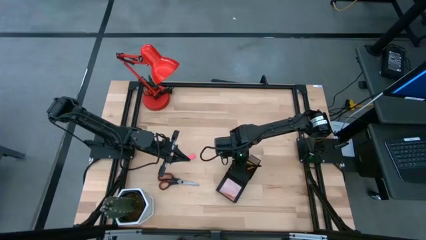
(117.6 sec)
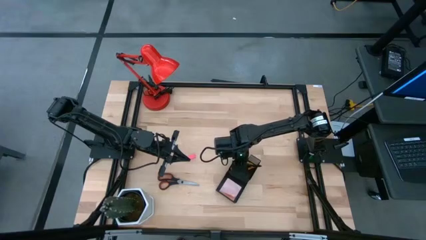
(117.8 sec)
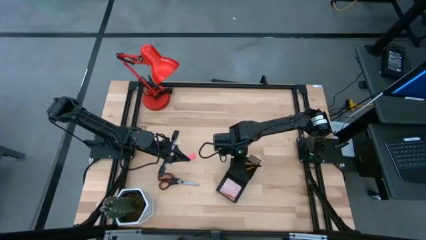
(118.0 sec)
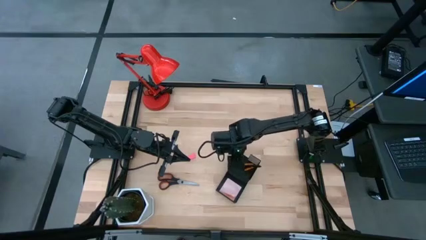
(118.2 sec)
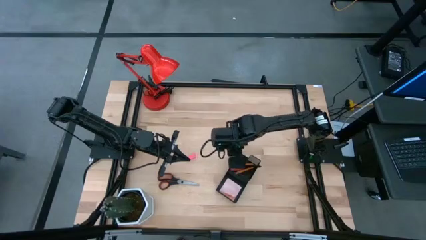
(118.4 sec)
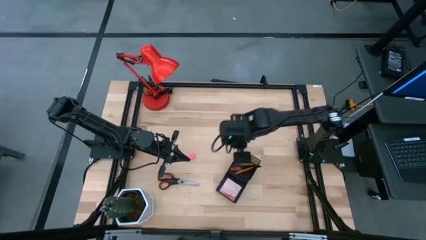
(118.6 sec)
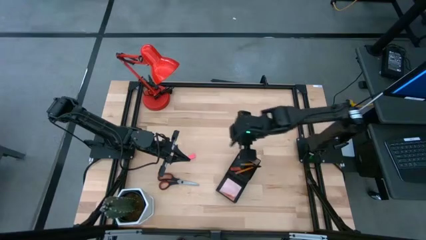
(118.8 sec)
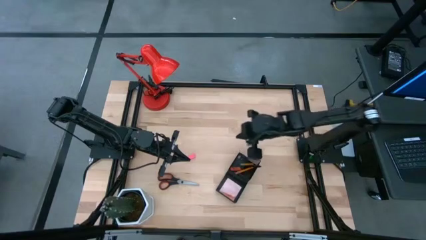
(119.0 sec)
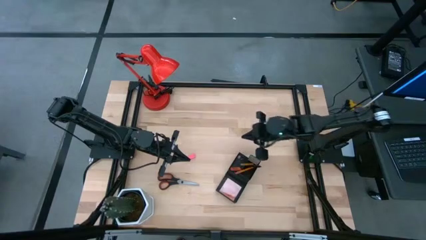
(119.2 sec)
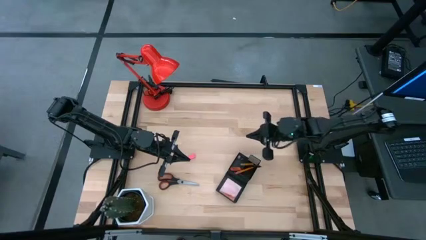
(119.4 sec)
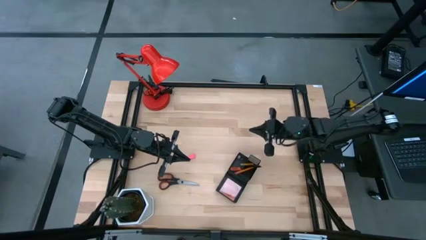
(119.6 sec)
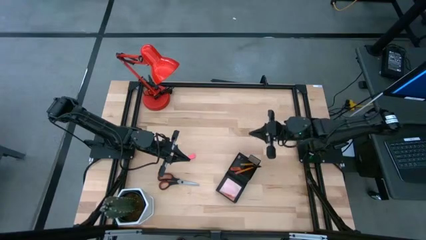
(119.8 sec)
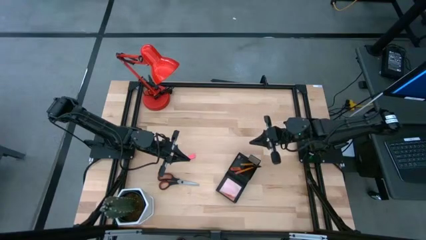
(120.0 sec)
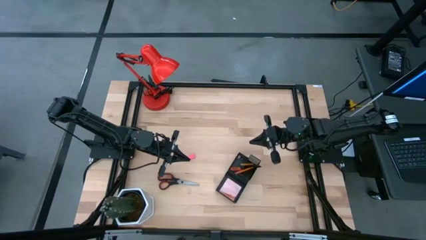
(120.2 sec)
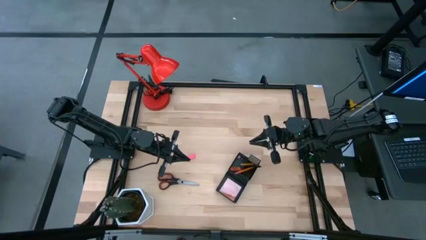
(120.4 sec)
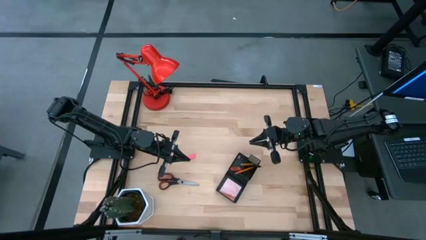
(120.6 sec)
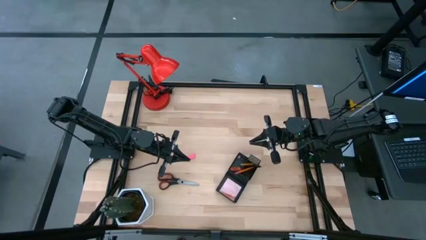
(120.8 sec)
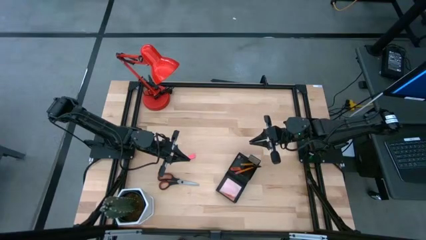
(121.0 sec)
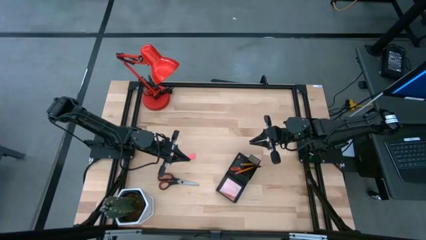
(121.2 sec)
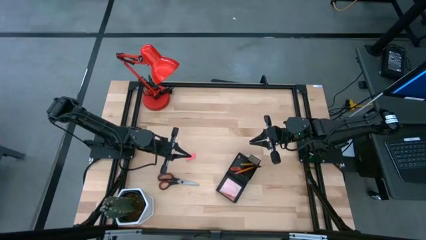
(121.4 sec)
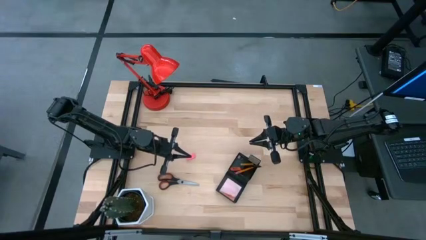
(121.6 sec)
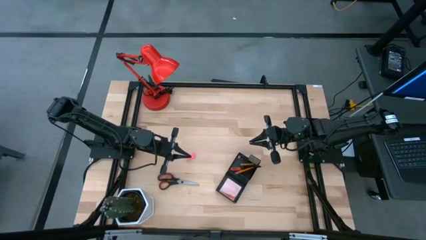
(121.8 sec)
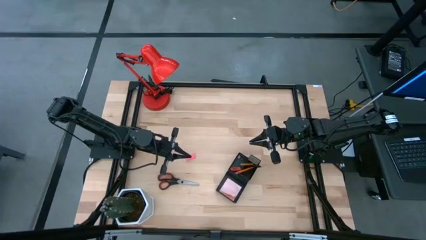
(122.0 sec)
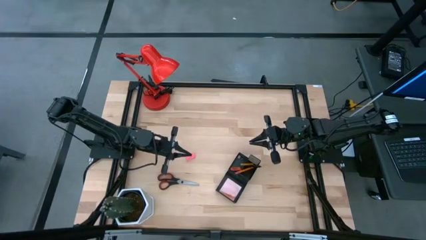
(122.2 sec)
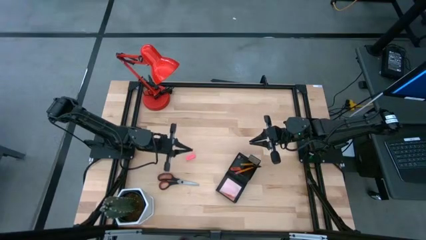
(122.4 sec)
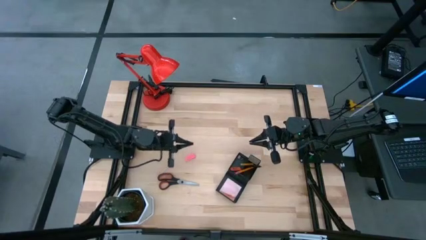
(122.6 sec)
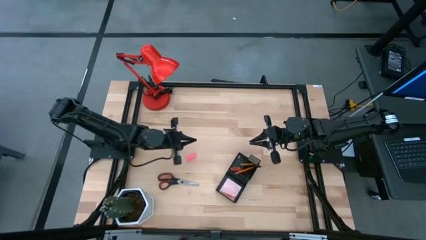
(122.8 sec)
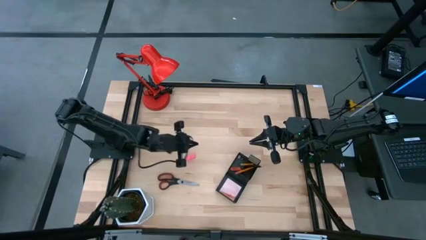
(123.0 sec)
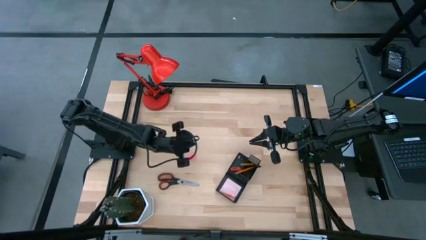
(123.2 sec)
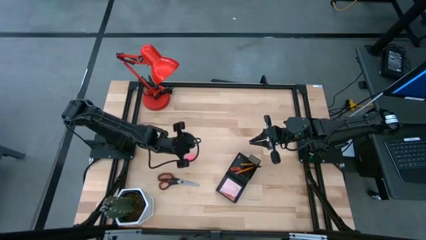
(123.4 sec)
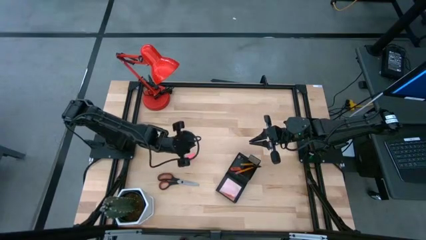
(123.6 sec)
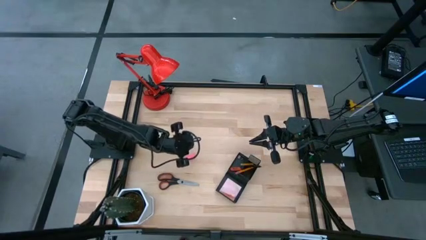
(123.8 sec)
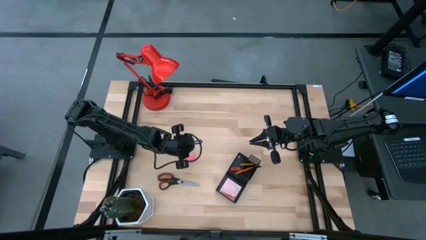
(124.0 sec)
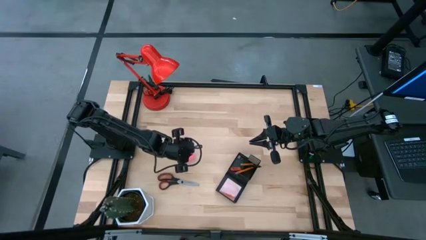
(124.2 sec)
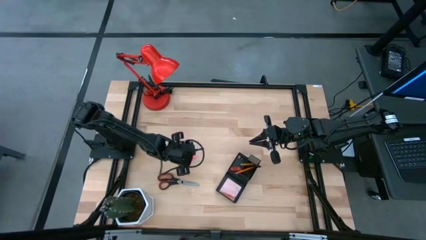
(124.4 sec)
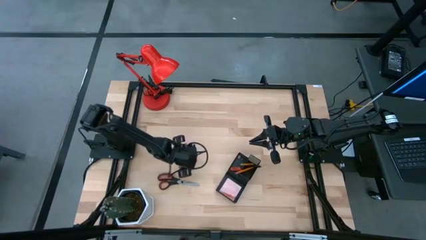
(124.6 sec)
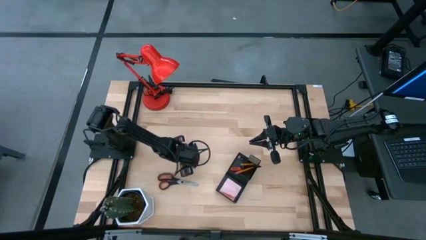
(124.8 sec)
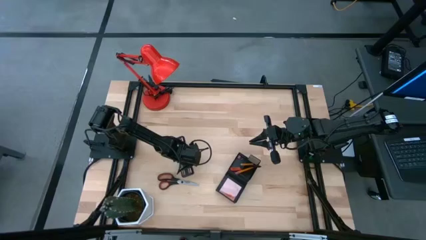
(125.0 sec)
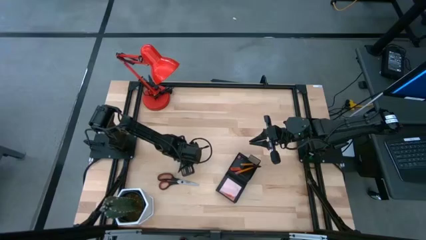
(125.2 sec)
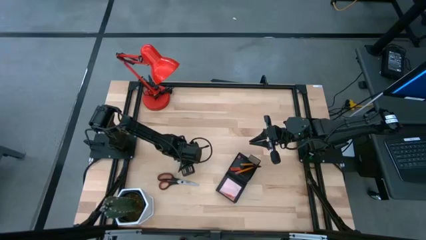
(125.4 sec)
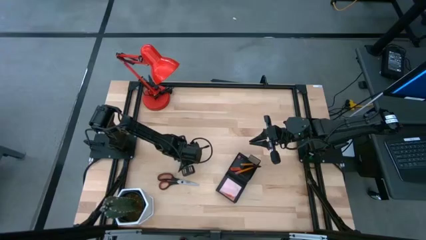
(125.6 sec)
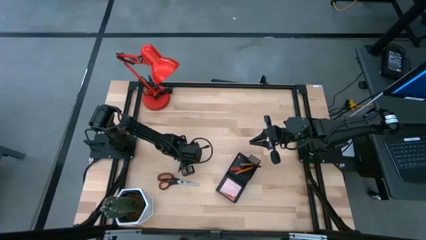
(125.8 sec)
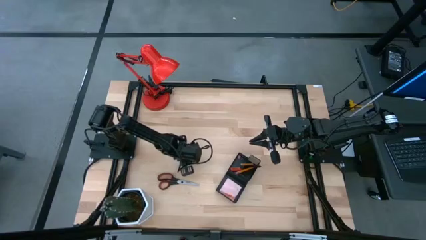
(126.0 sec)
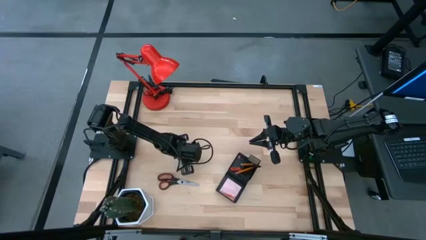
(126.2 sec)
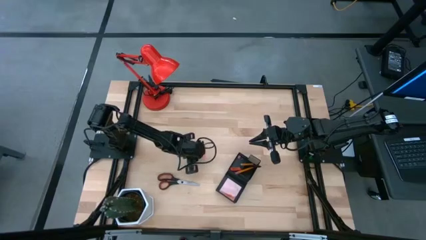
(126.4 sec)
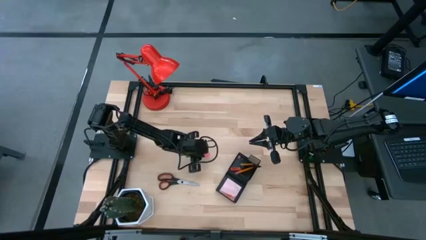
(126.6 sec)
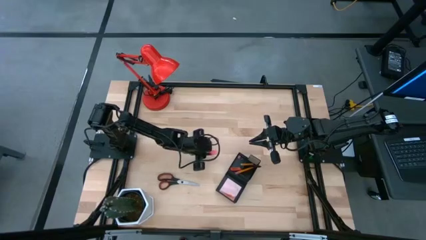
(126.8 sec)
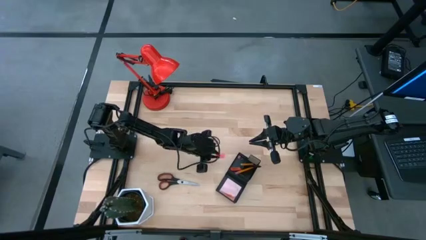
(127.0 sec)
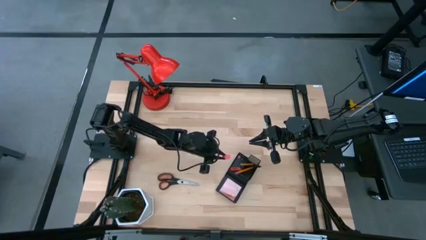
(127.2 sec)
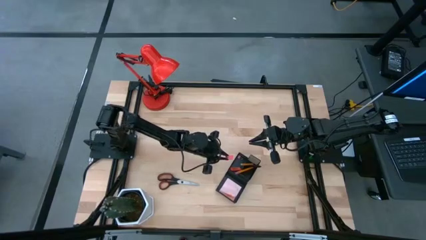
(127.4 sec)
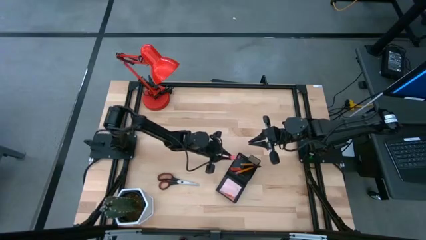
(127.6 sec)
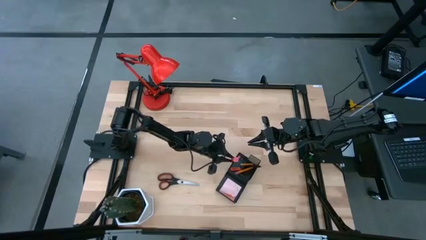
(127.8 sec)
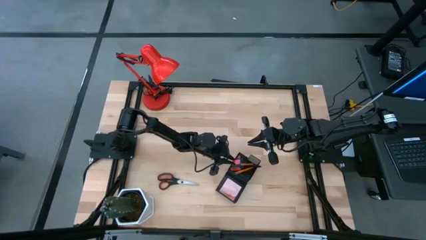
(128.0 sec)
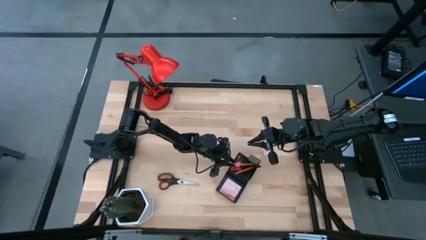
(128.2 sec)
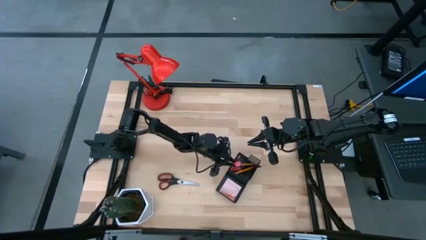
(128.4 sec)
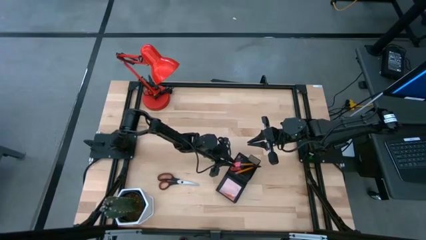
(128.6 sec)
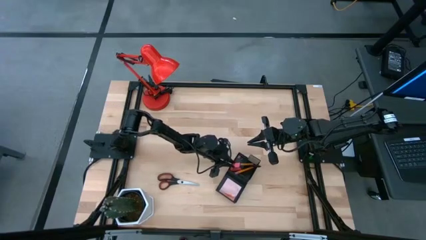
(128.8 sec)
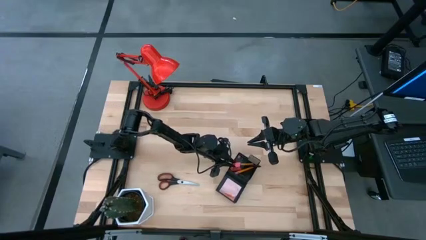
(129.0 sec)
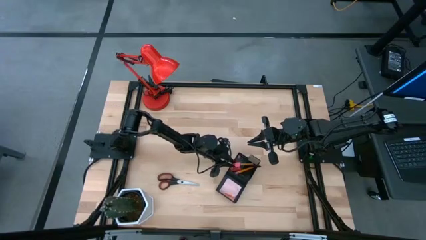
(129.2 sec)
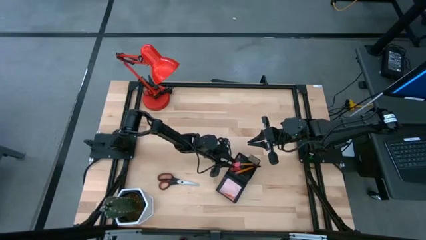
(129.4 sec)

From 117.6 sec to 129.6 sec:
Task: Pick and place office supplies into organizer
Put the pink eraser into the desk organizer
